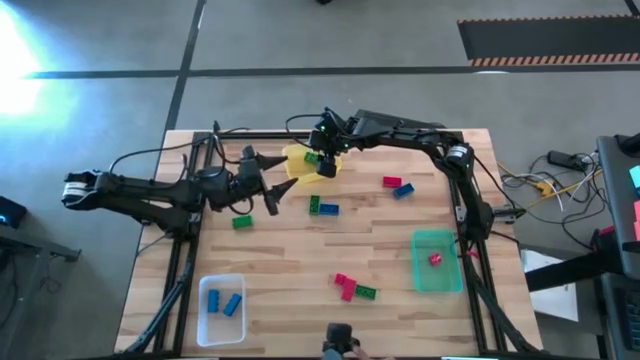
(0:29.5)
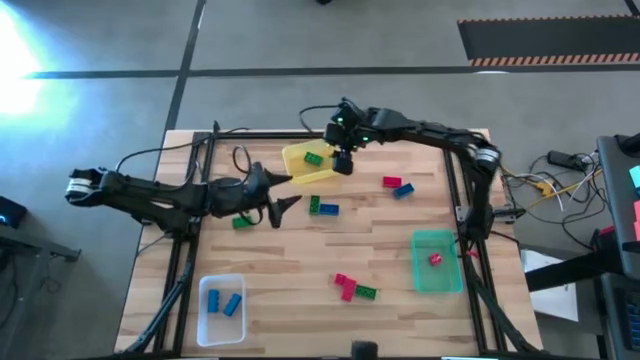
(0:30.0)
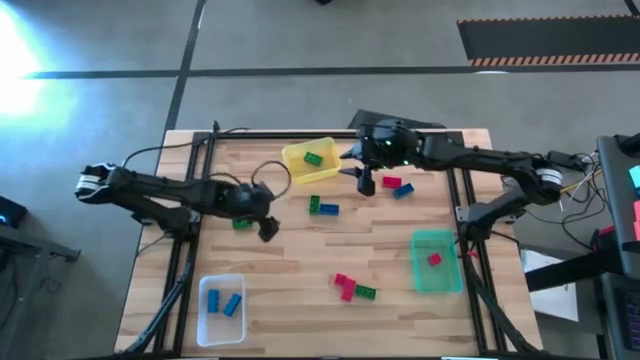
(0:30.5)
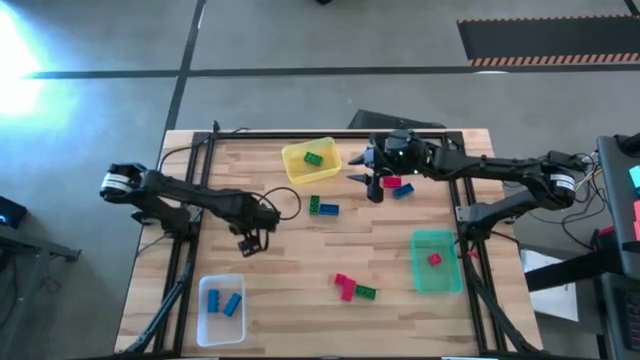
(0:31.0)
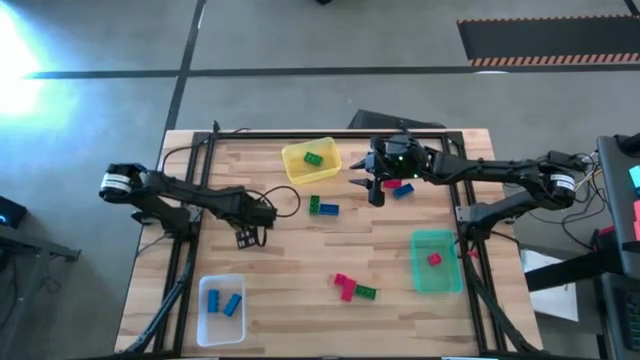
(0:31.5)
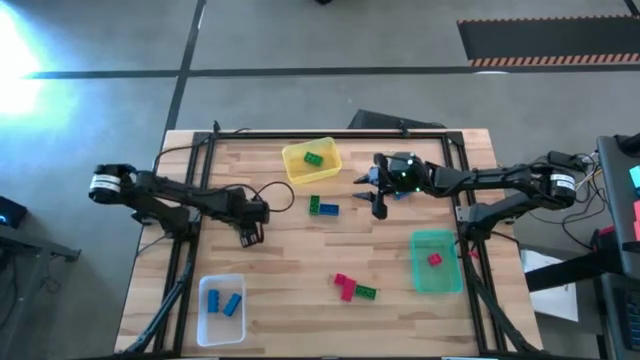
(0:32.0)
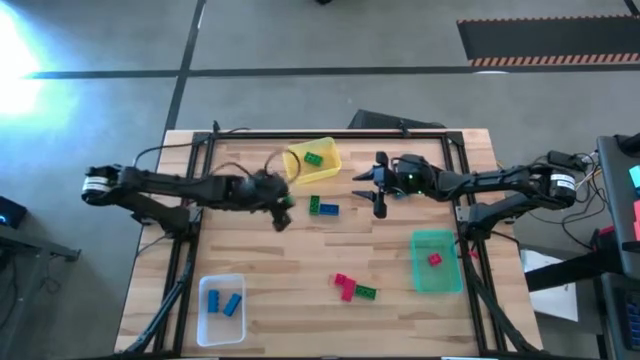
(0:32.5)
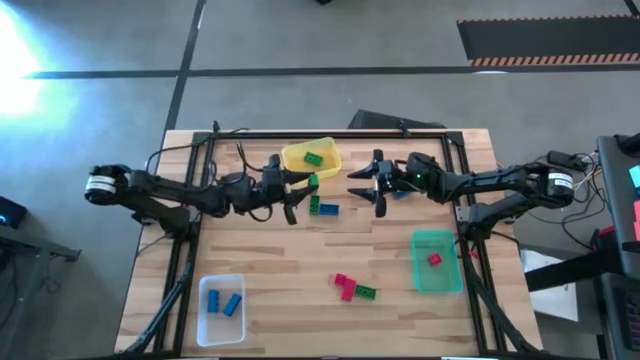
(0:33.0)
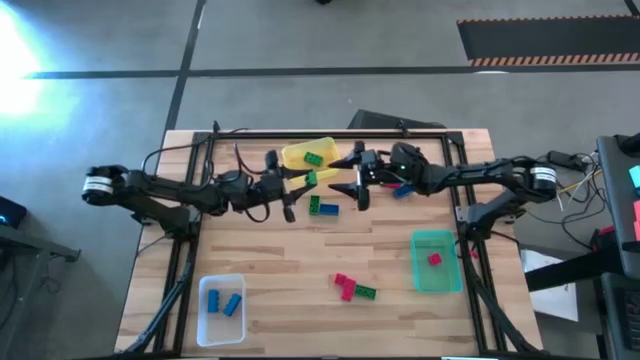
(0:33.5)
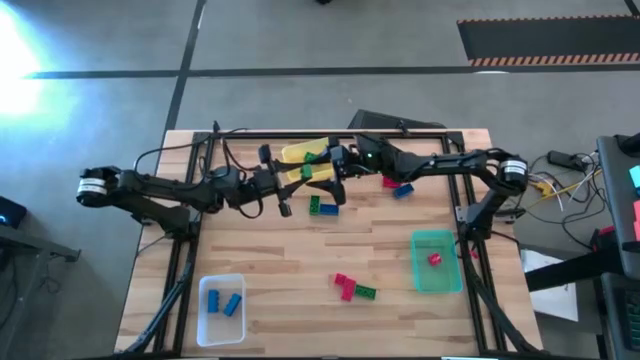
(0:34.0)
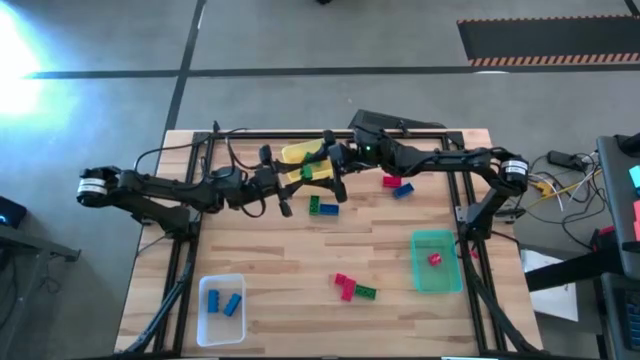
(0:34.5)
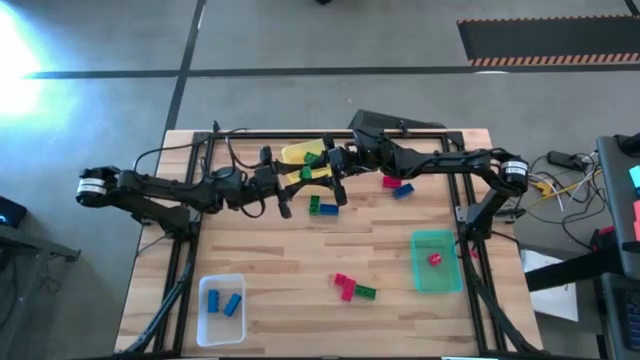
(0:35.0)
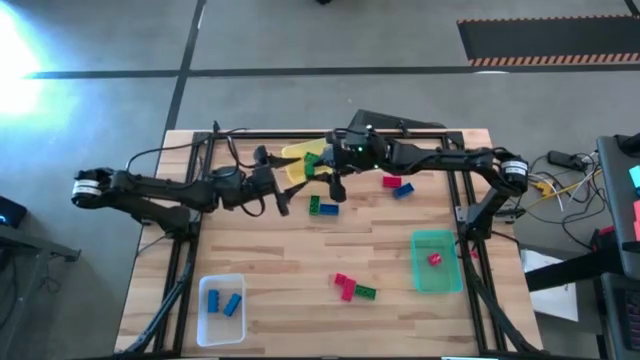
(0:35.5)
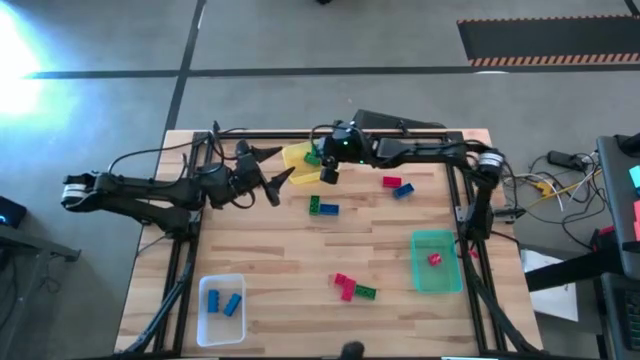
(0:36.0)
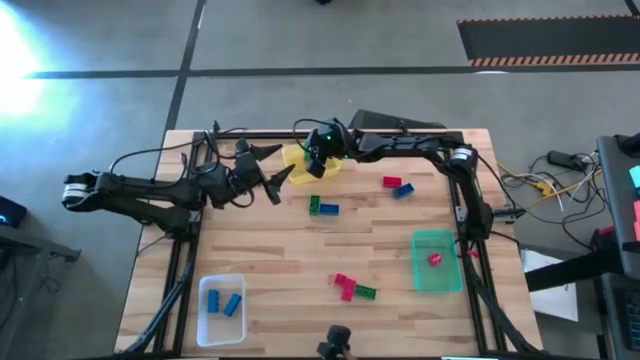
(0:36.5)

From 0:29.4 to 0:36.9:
Task: Sort & place blocks by color
Put the green game piece into the yellow bin

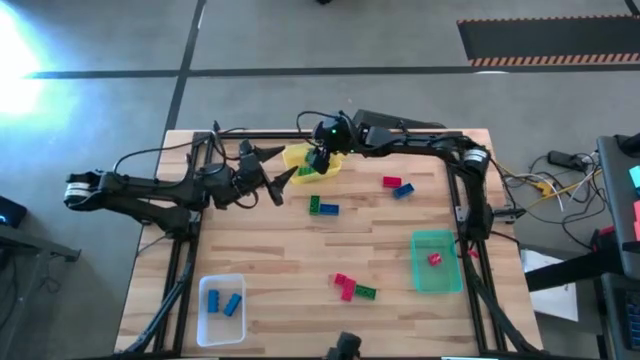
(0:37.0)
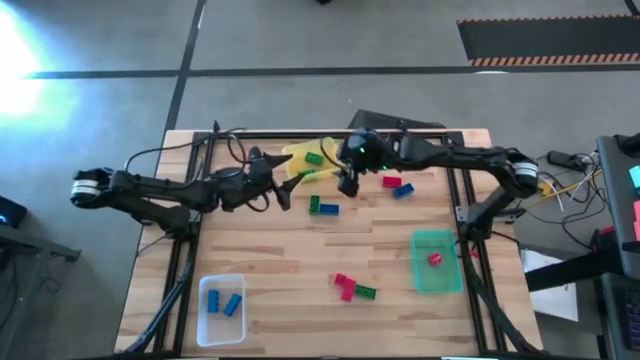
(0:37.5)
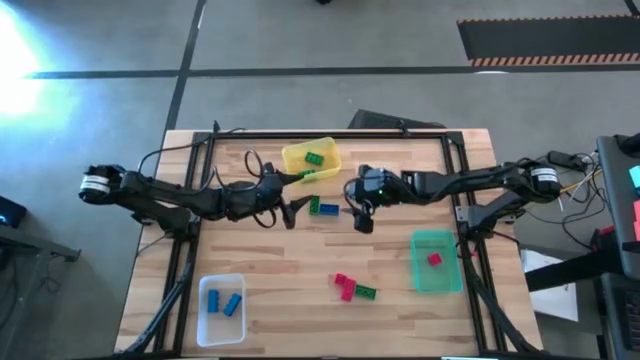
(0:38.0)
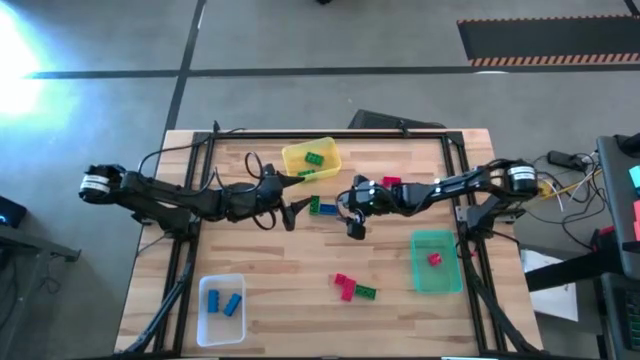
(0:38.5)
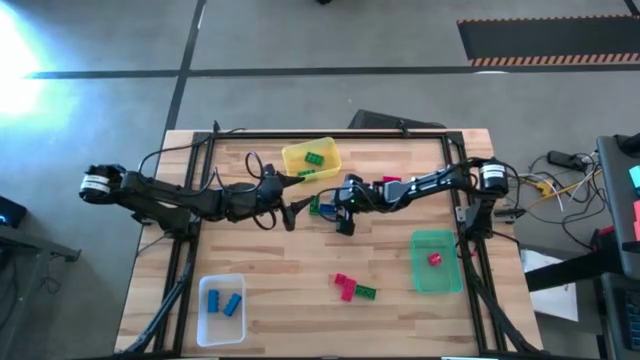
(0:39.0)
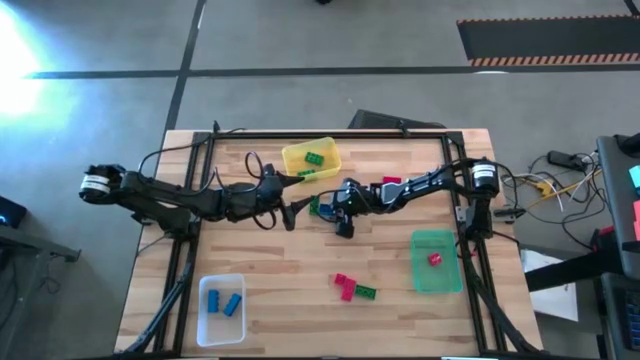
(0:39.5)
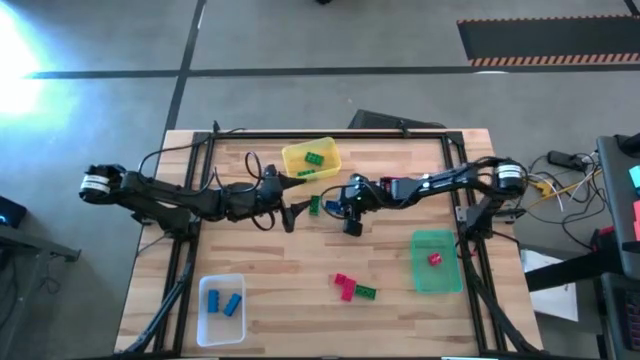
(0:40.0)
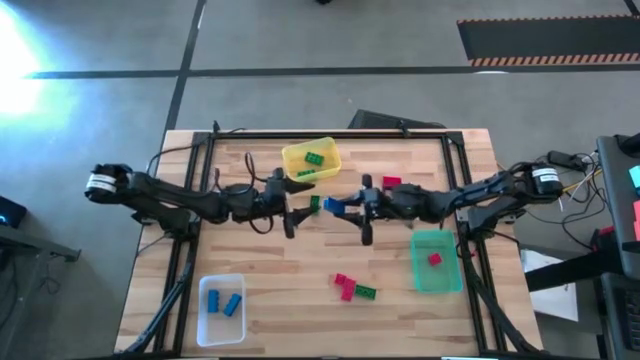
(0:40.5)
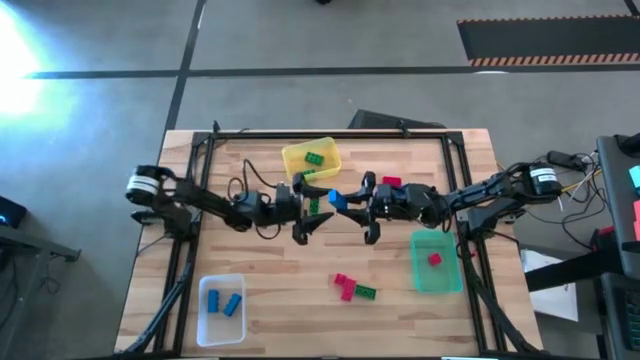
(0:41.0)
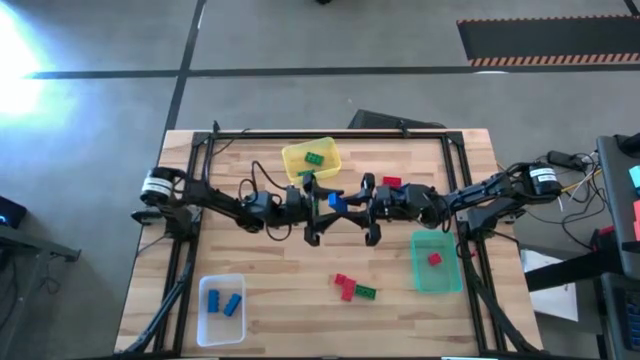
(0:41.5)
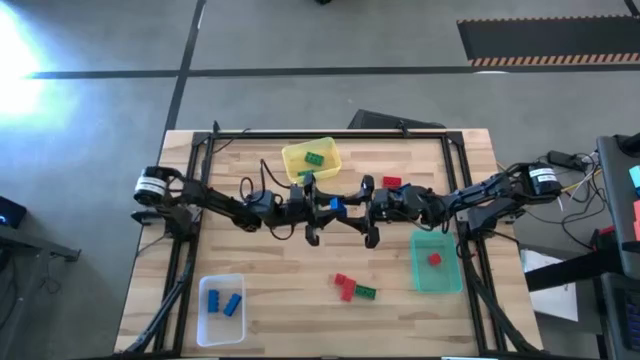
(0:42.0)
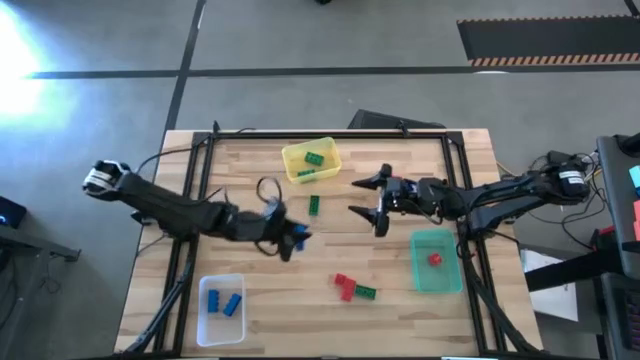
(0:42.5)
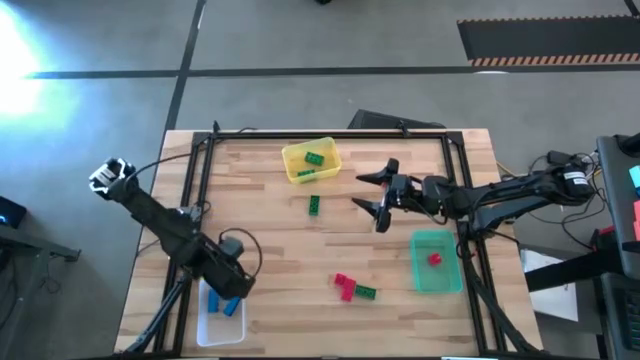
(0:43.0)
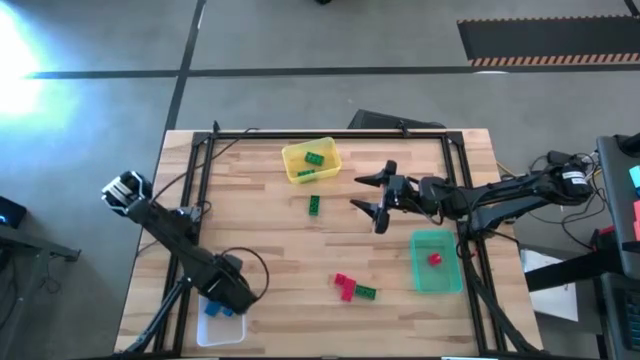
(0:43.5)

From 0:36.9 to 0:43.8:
Put the blue game piece into the transparent bin

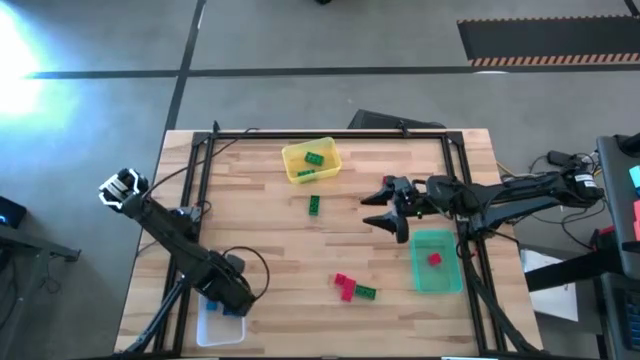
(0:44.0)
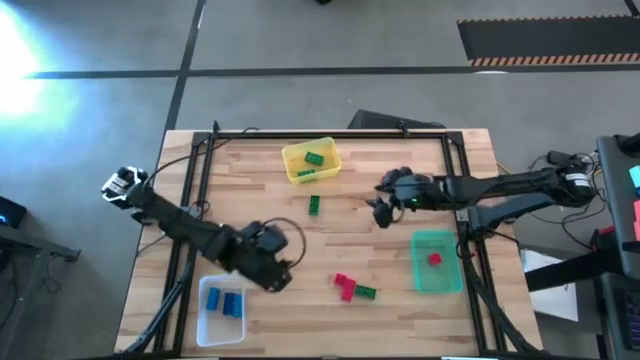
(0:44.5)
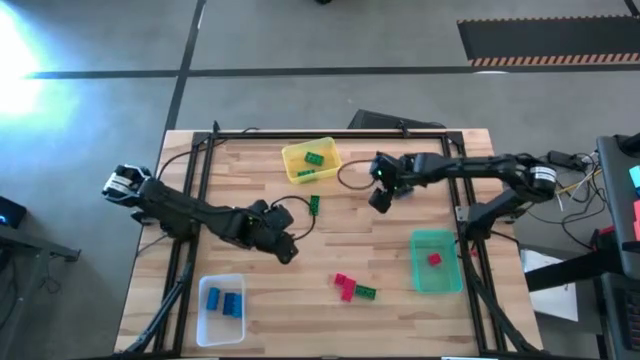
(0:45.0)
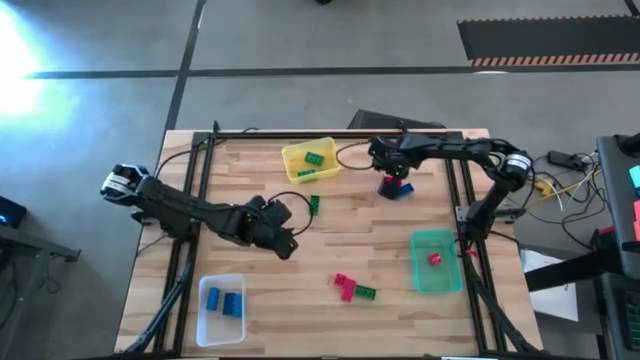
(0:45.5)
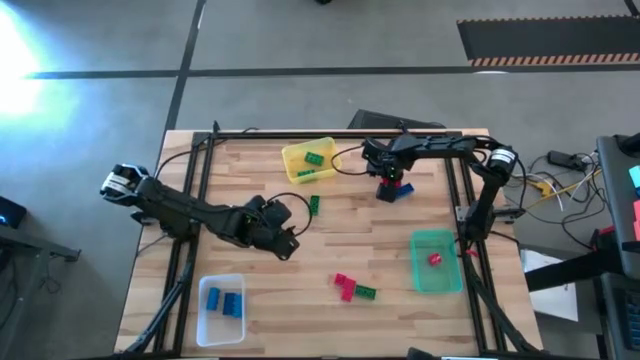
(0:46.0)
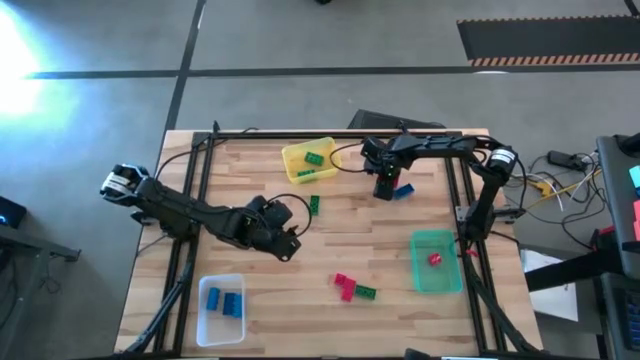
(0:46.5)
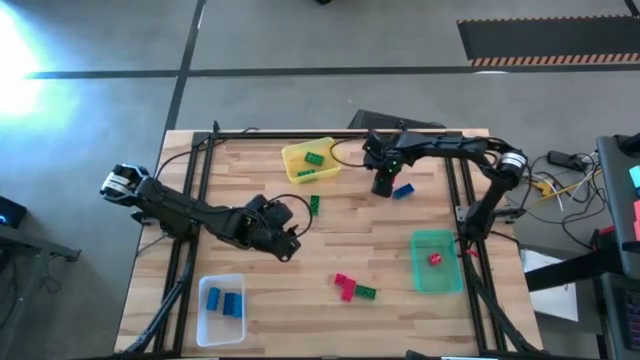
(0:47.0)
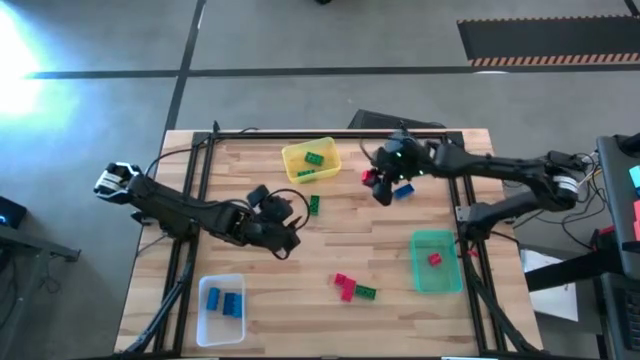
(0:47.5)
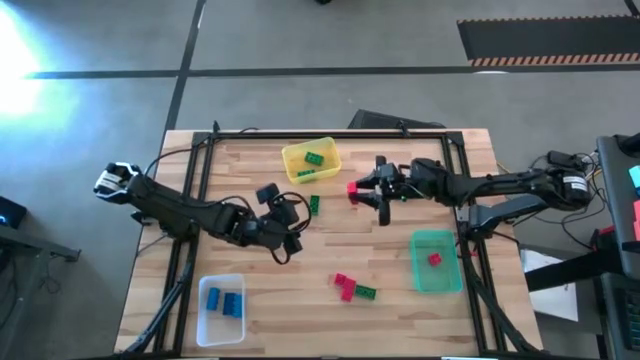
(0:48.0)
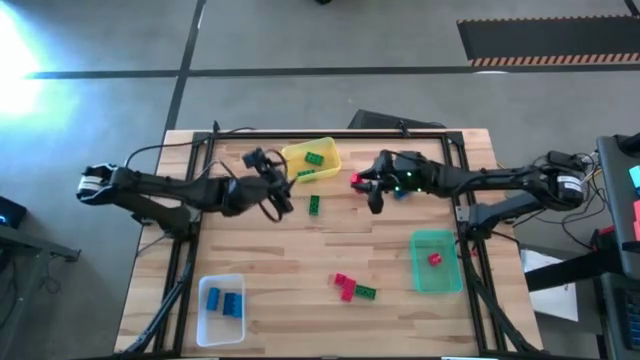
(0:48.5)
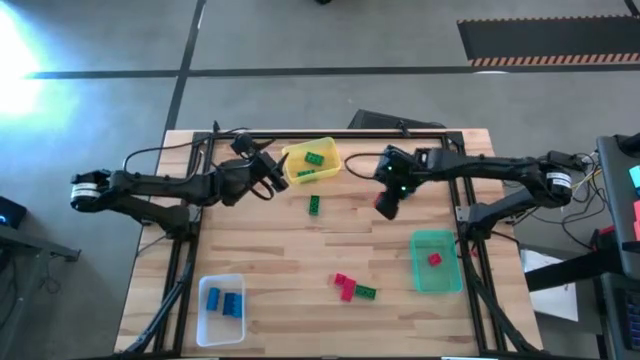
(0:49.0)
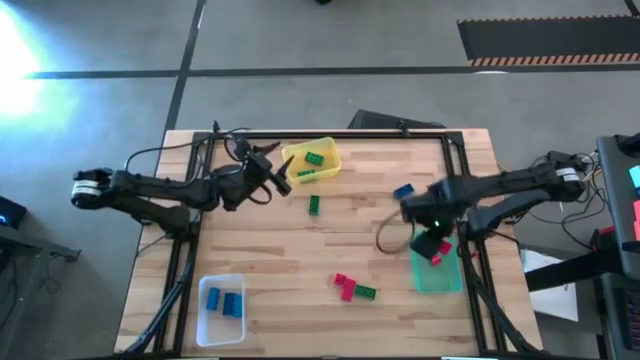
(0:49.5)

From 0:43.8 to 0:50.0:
Put the red game piece into the green bin

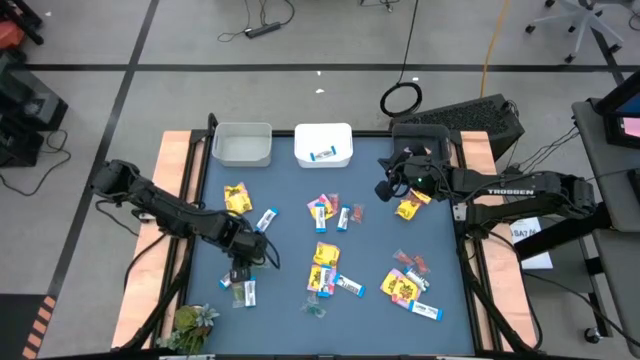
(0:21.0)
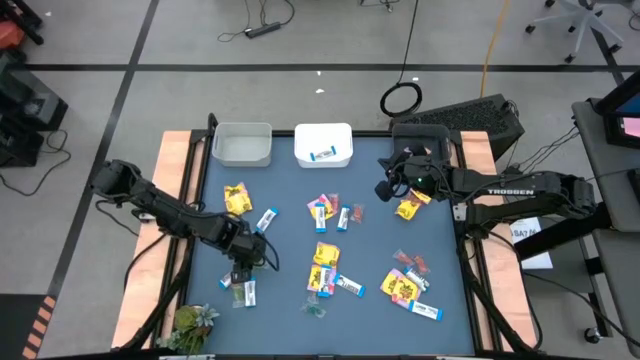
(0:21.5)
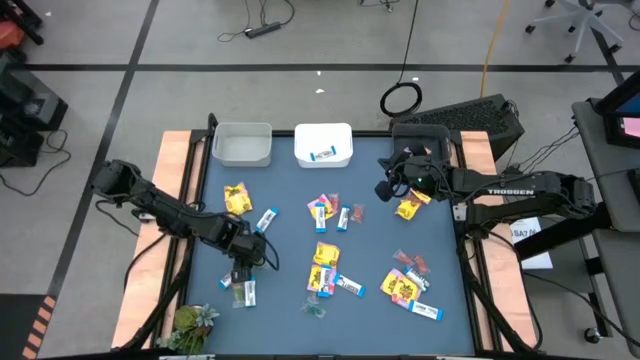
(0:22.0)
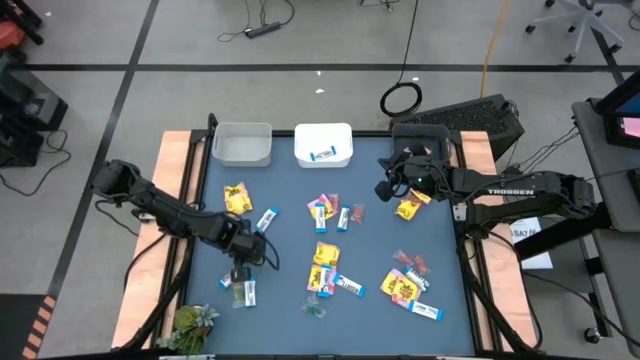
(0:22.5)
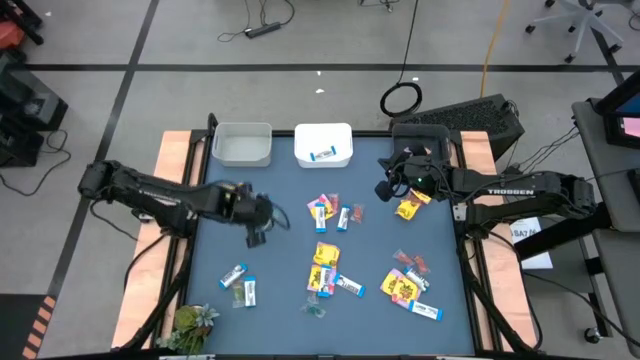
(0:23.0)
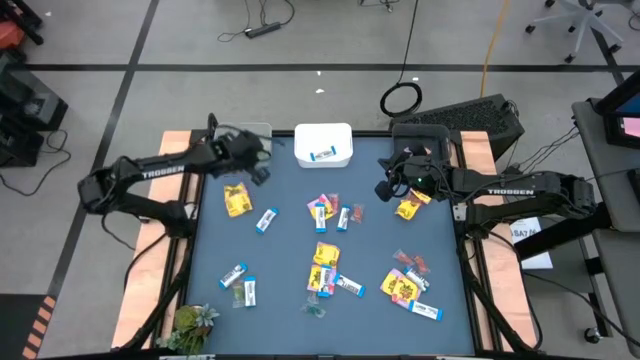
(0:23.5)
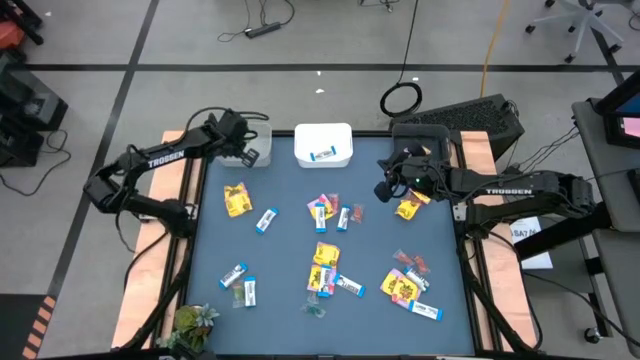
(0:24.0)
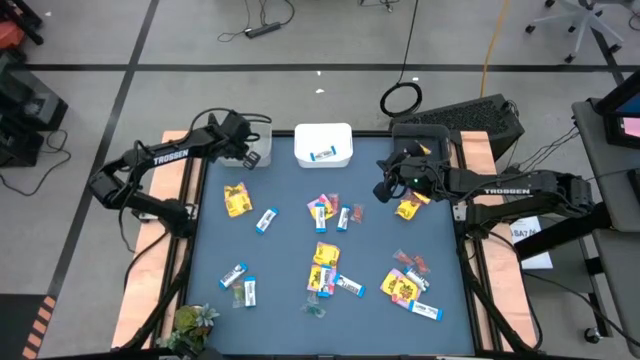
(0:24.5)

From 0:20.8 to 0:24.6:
Task: Sort candy
Put the green gummy into the gray bin
